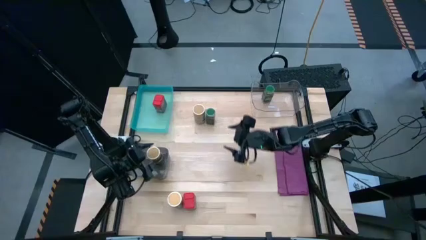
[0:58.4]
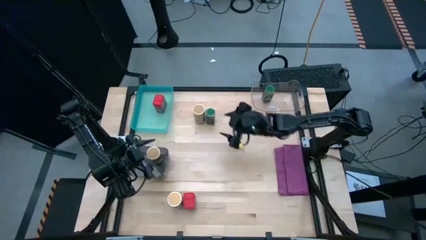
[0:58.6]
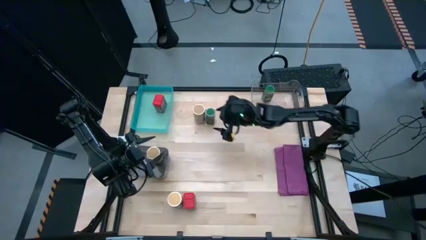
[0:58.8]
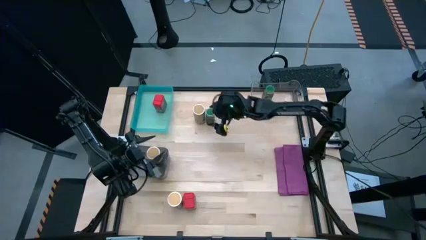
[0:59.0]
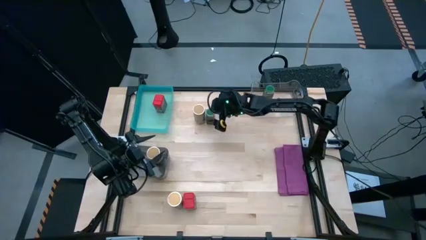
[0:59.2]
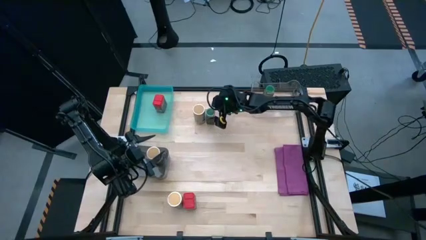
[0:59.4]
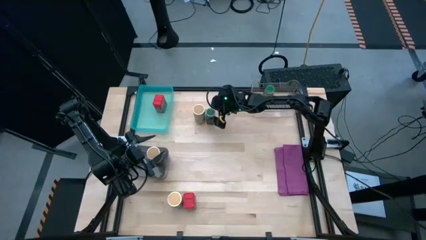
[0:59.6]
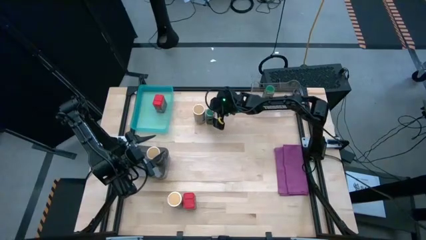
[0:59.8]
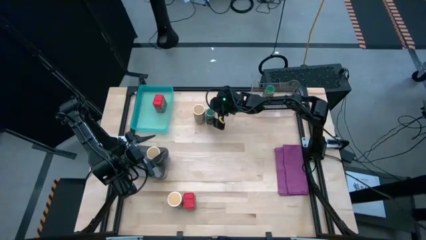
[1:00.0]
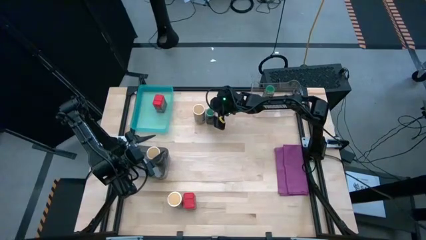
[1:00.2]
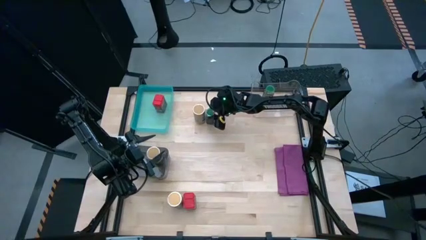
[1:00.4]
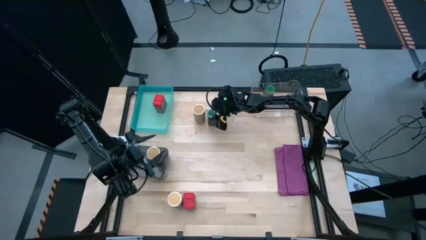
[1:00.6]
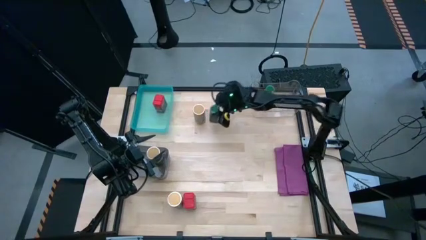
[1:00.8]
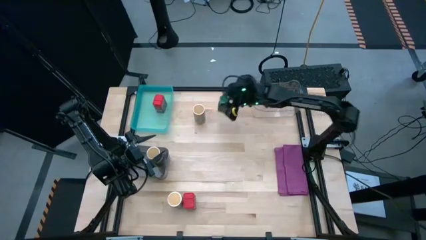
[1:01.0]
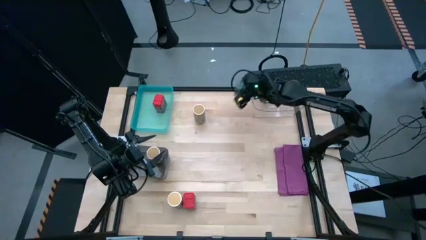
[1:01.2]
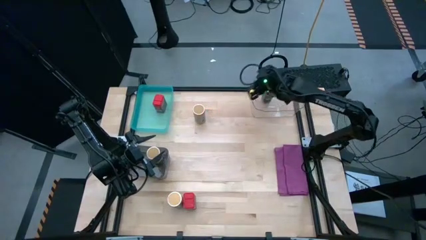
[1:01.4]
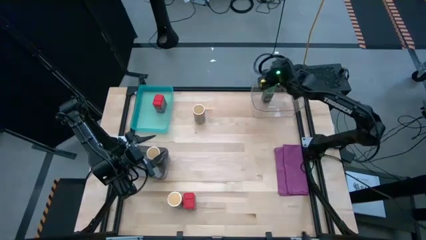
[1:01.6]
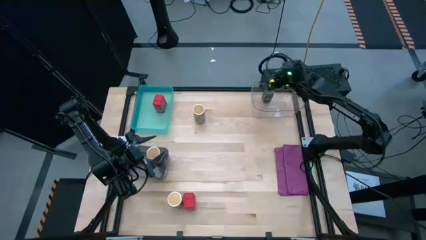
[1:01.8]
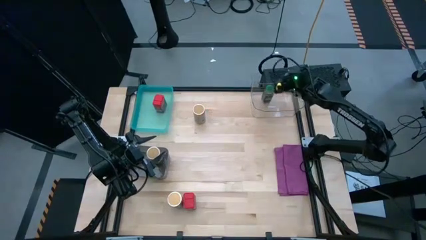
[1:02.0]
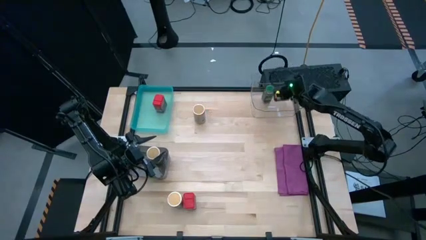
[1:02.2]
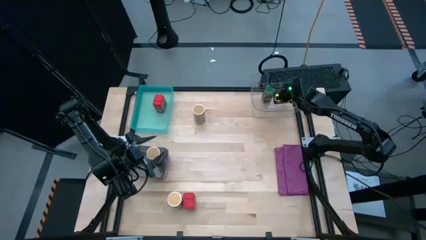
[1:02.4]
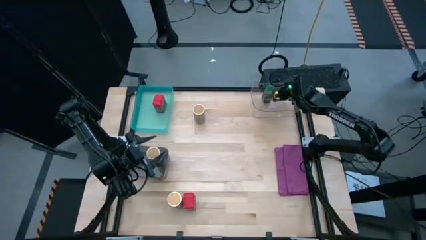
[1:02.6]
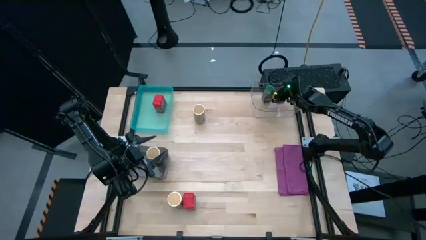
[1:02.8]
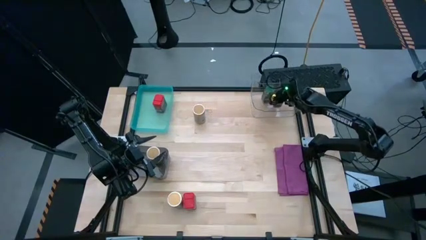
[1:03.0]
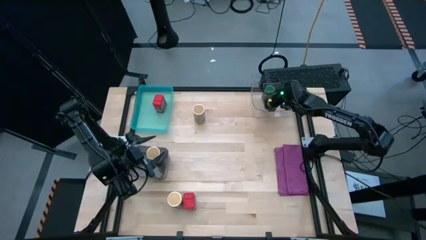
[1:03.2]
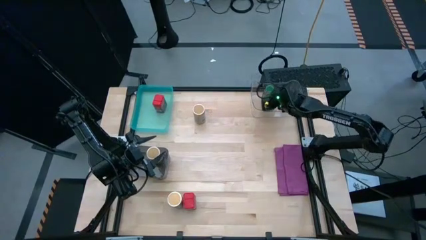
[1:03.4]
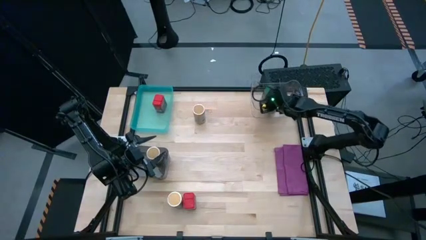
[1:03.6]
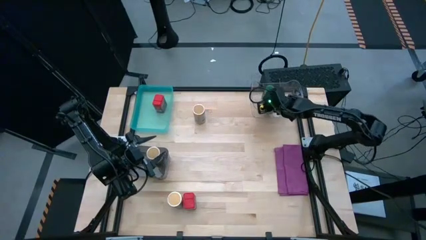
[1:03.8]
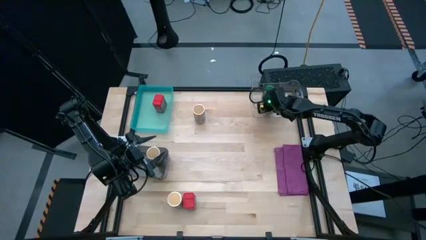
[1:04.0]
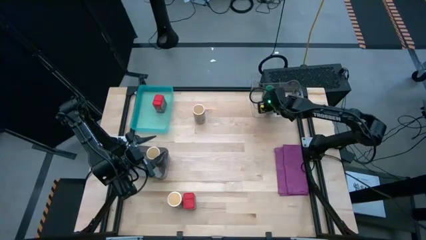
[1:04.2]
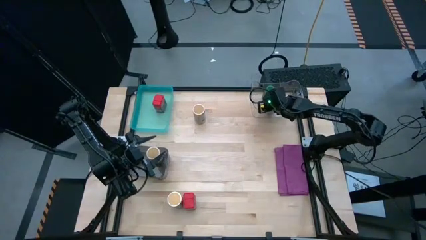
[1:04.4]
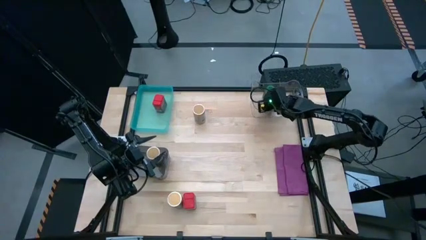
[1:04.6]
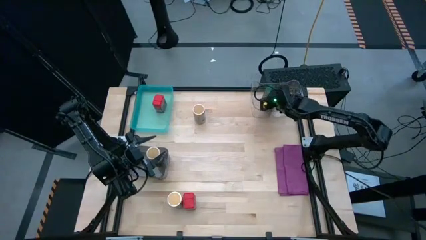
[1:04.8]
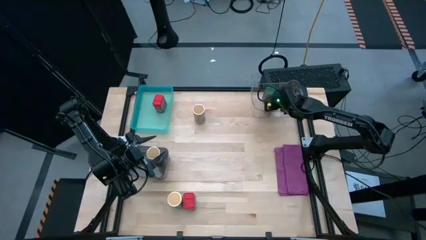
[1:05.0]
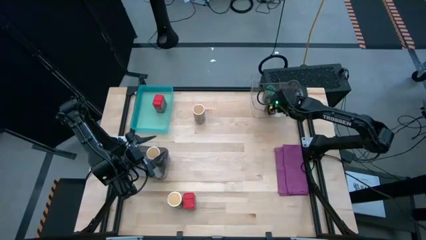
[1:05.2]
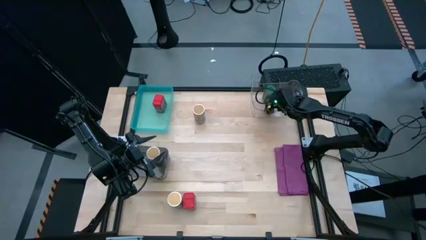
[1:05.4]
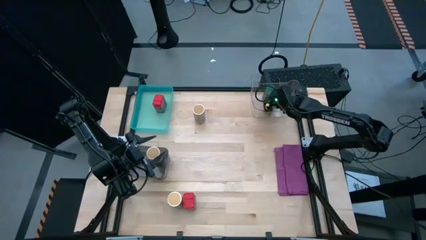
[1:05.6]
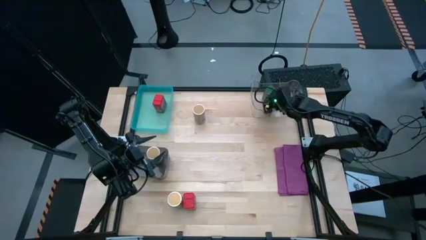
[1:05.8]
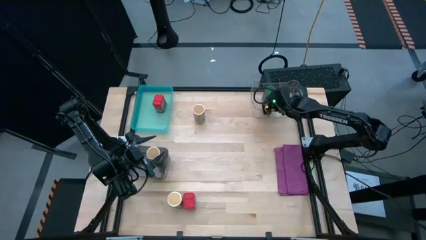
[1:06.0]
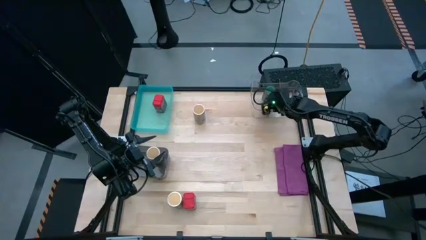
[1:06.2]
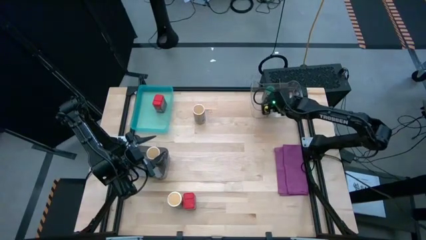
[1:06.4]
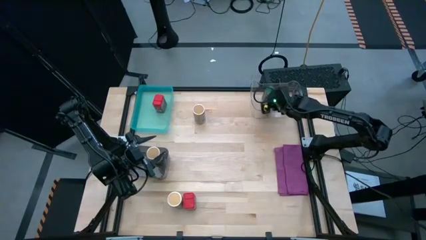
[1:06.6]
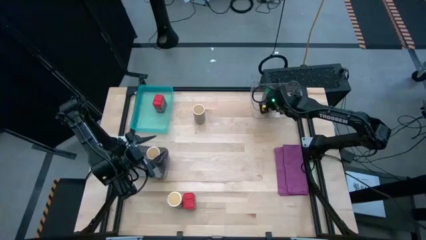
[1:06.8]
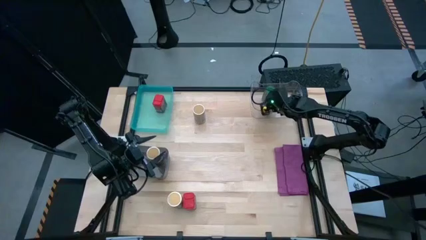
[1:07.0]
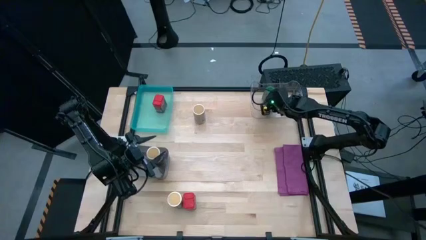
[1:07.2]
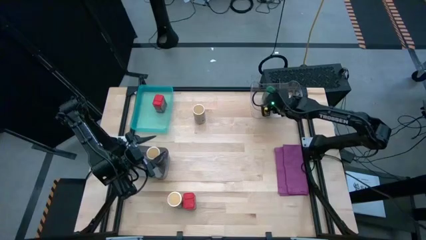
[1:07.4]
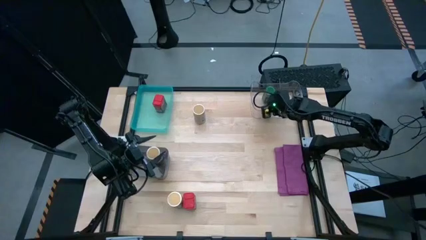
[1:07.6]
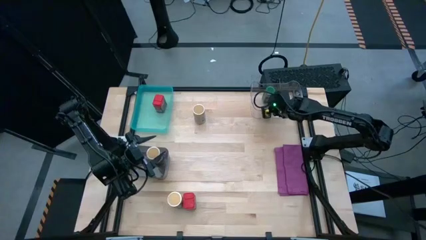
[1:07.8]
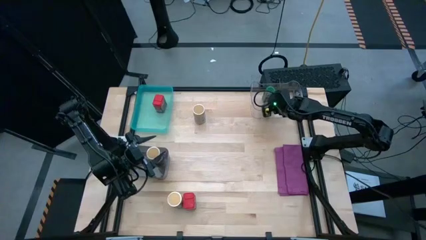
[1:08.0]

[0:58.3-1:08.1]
Task: Sort spices by type
Put the green seasoning bottle into the transparent bin
